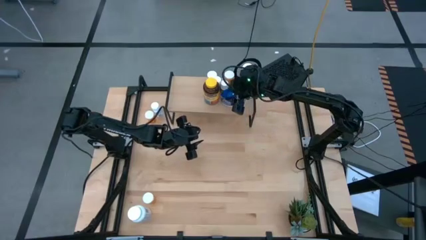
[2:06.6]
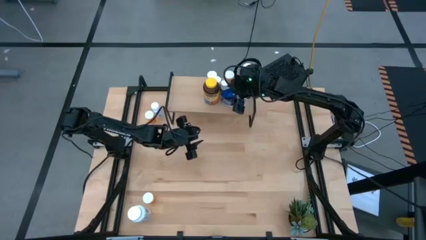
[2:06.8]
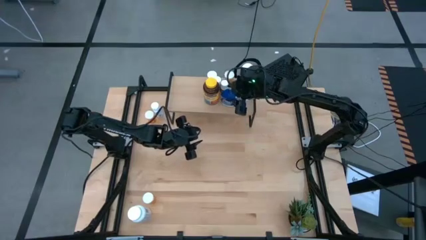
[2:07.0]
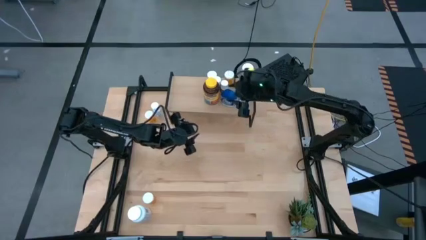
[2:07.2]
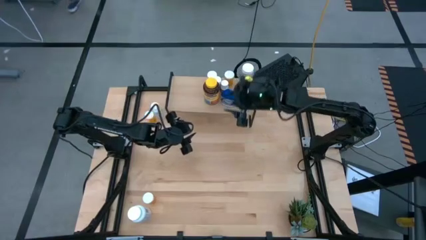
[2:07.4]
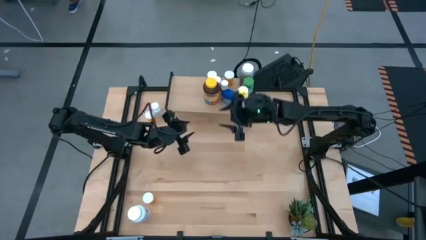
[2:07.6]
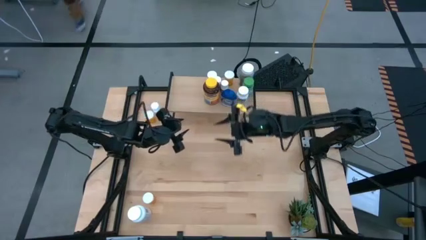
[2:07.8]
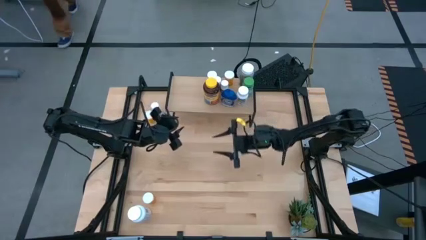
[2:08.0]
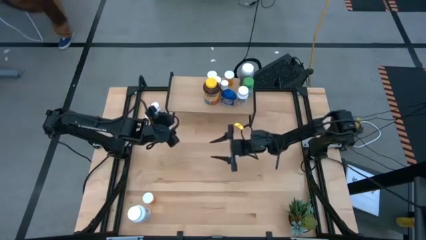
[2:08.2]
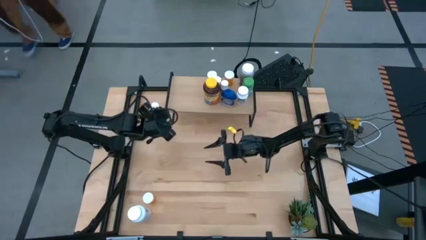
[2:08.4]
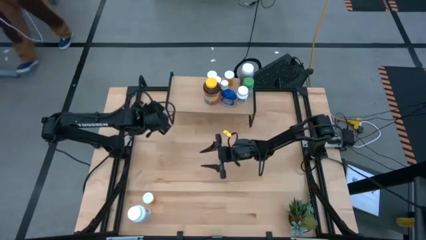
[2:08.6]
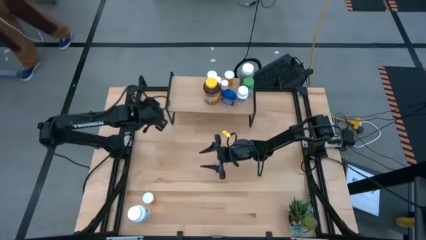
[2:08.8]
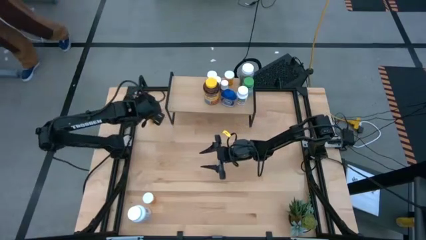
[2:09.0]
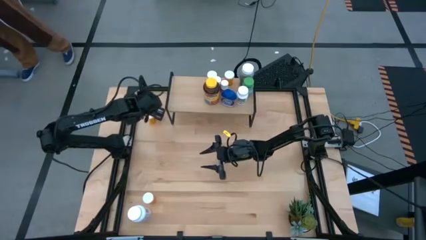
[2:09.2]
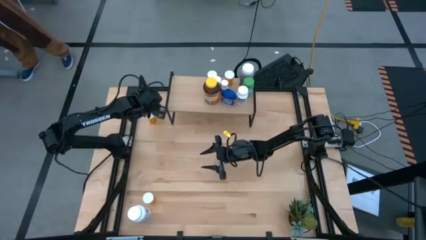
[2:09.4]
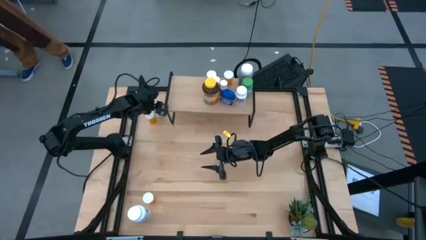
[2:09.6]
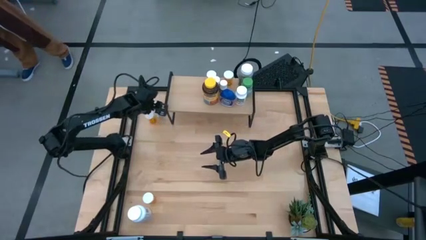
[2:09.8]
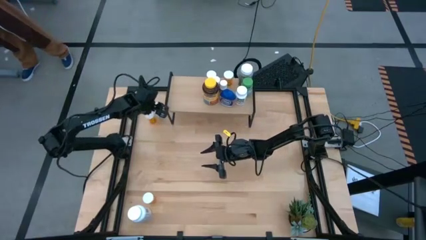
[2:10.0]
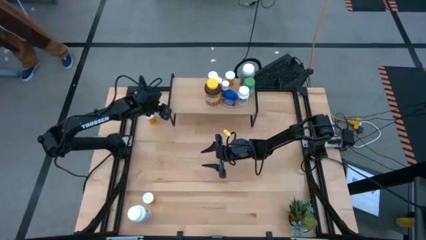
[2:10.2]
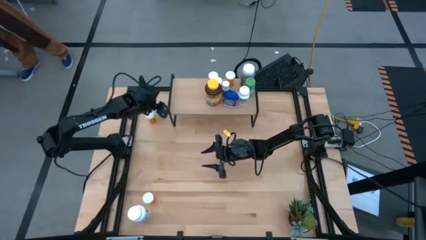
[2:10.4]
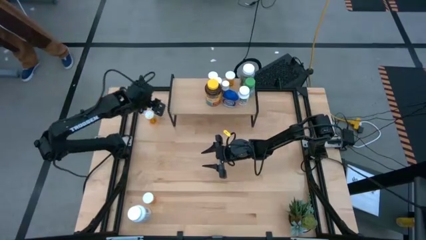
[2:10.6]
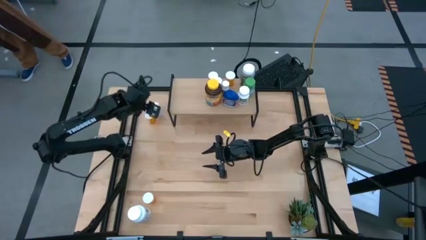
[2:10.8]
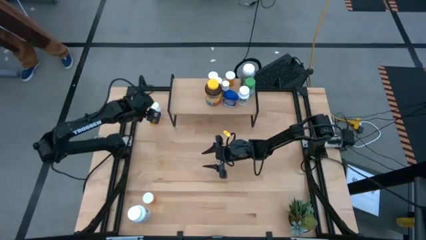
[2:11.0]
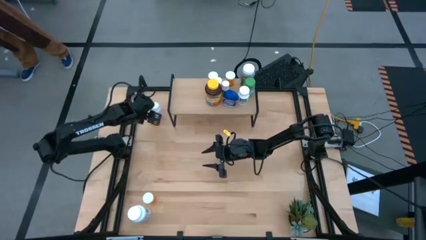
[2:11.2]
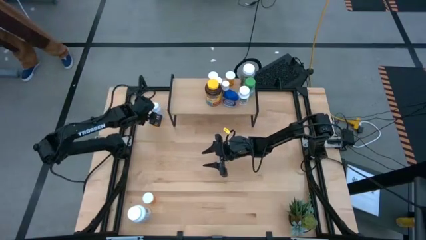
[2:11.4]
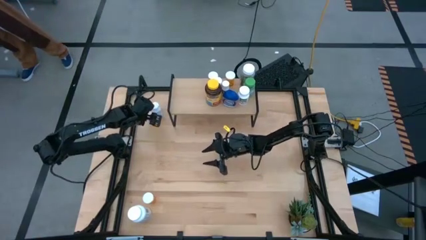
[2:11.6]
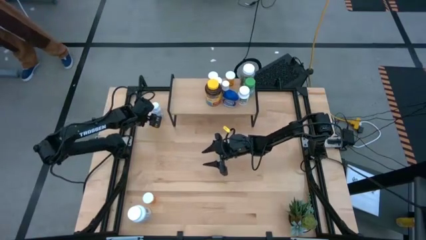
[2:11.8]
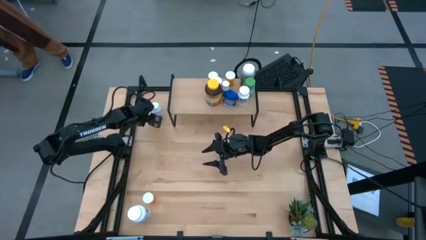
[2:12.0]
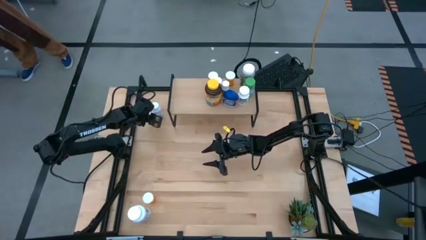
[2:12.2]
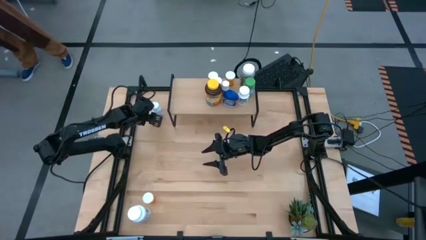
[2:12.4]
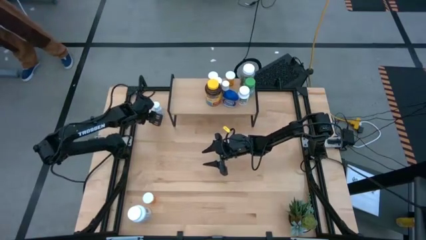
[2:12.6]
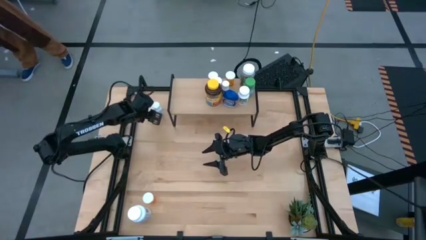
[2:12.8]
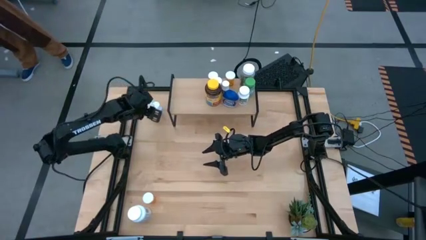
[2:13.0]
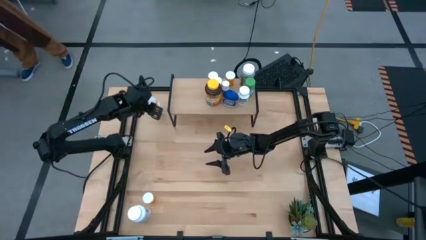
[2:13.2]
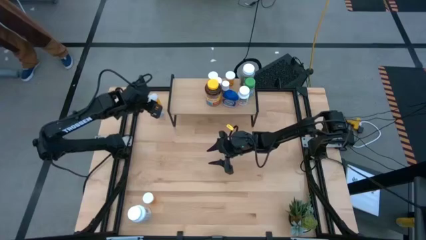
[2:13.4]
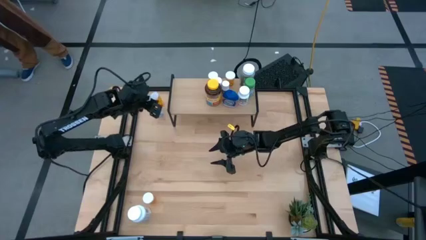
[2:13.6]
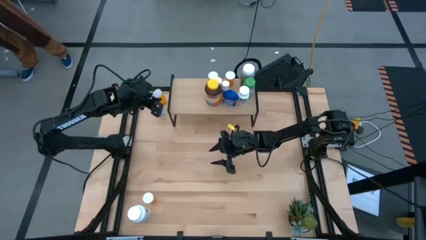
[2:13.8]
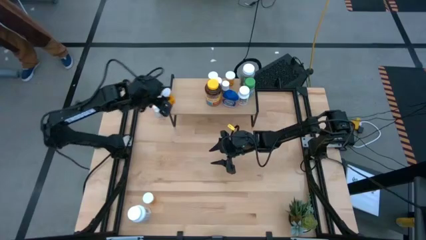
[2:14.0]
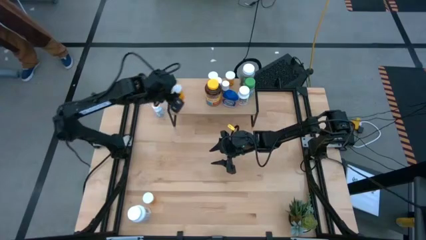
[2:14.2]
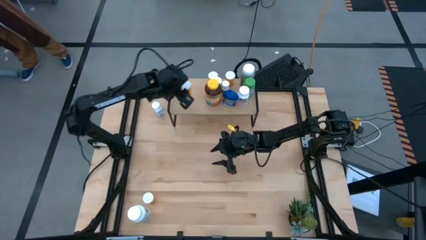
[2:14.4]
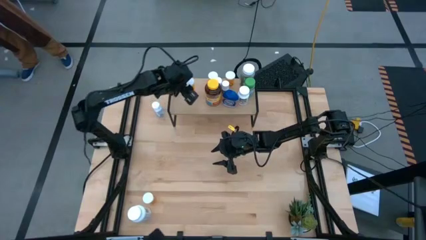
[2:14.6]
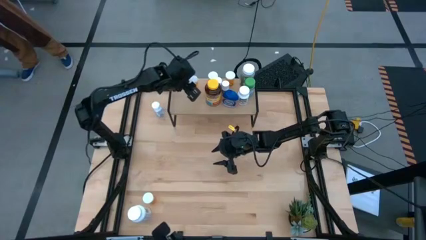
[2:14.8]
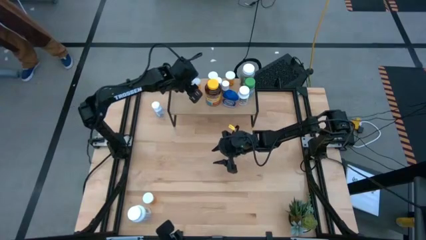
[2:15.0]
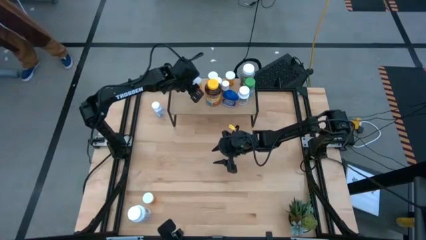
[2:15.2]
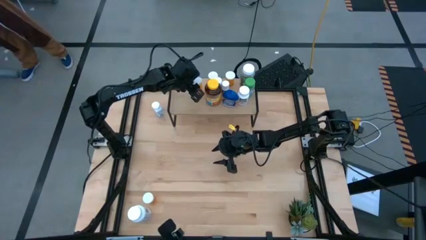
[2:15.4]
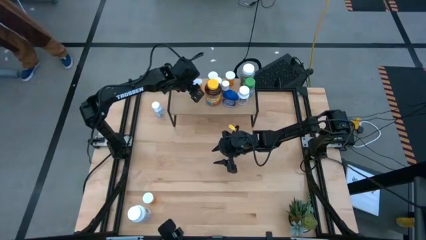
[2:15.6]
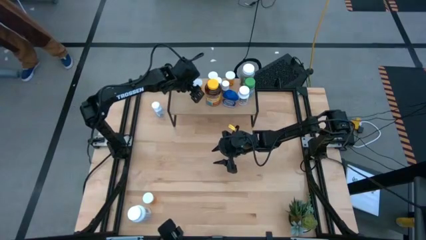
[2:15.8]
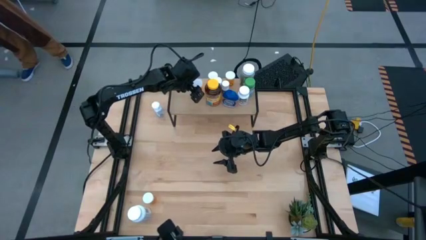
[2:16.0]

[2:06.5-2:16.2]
Task: Pick and place medicine bottles onto shelf by color
Put the orange pill bottle on the shelf
